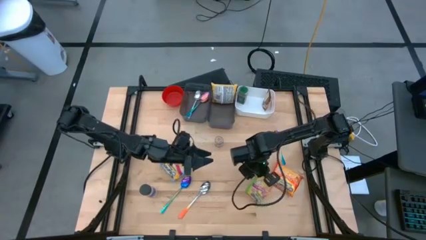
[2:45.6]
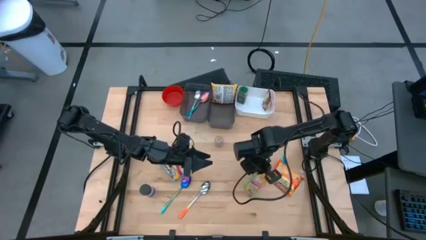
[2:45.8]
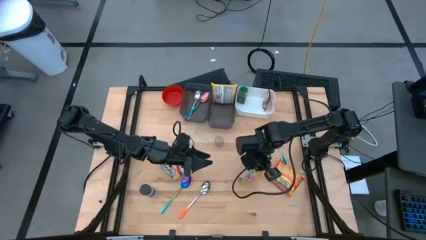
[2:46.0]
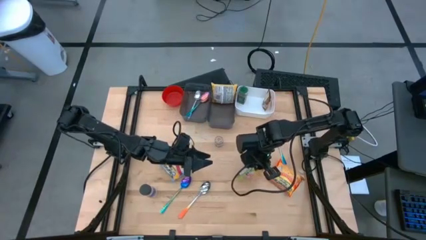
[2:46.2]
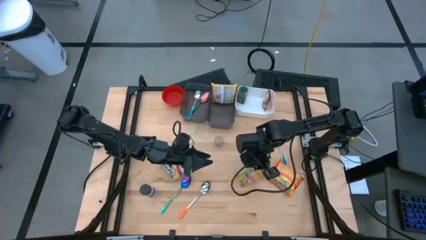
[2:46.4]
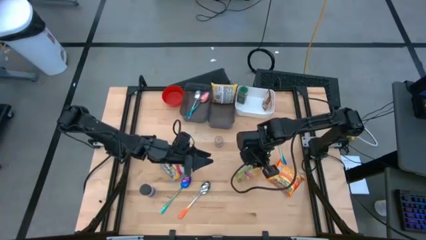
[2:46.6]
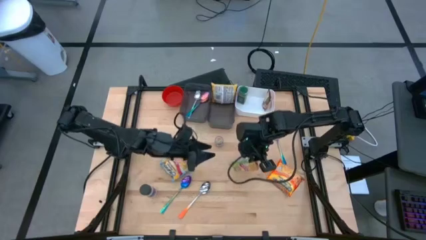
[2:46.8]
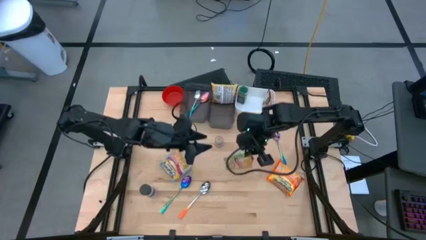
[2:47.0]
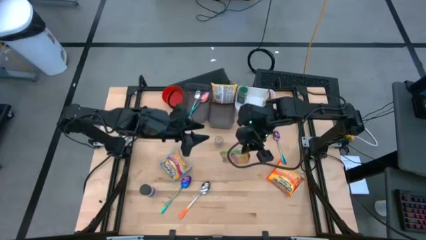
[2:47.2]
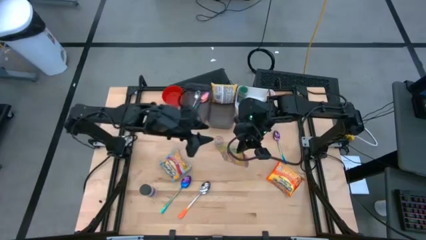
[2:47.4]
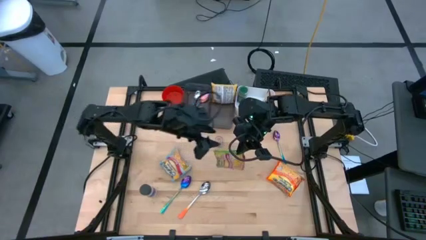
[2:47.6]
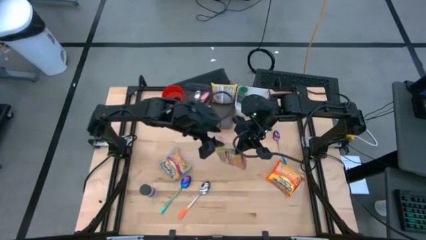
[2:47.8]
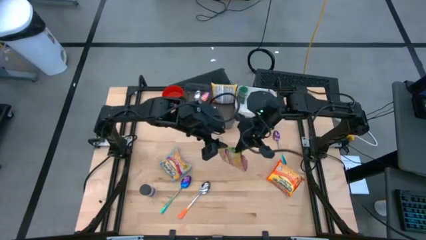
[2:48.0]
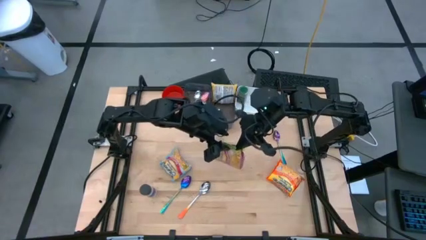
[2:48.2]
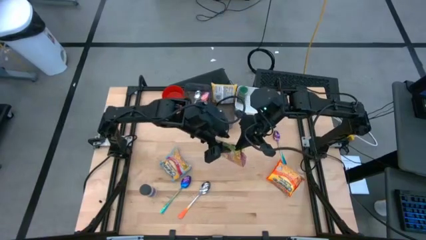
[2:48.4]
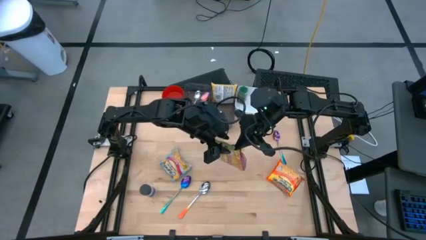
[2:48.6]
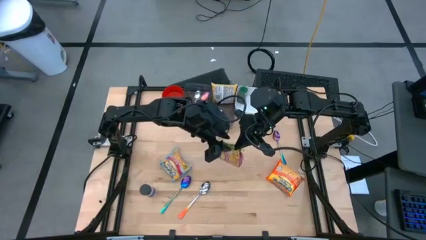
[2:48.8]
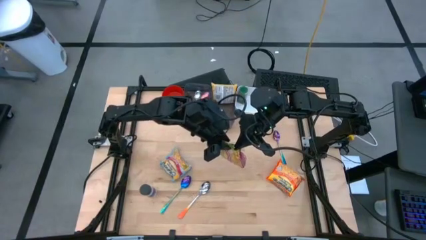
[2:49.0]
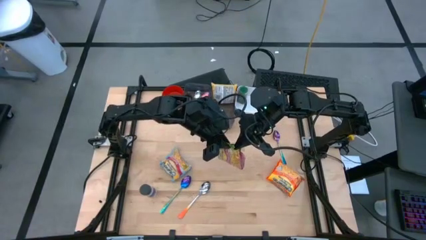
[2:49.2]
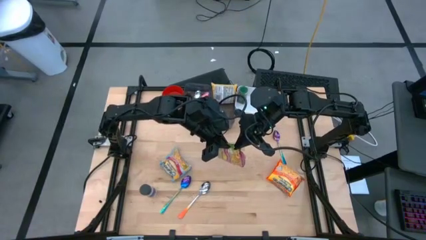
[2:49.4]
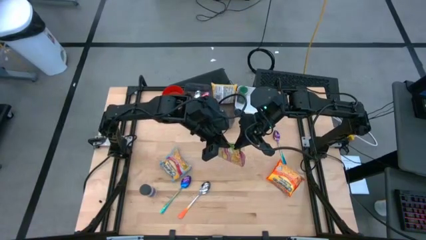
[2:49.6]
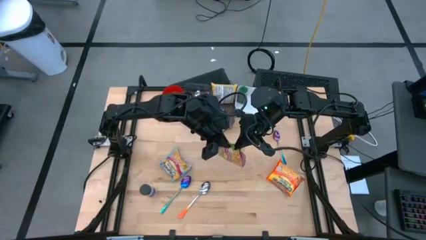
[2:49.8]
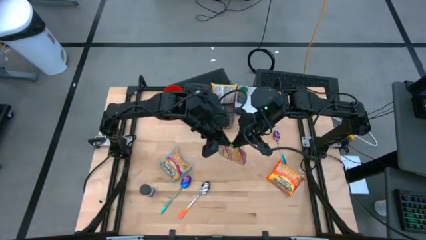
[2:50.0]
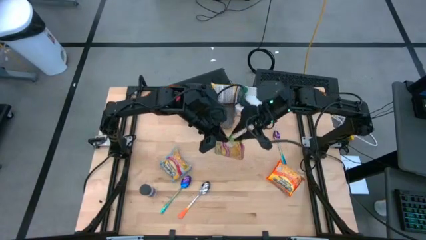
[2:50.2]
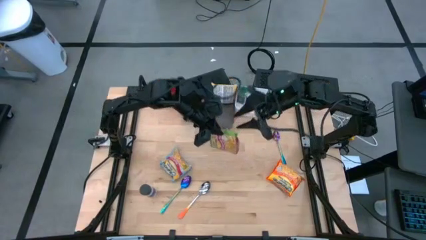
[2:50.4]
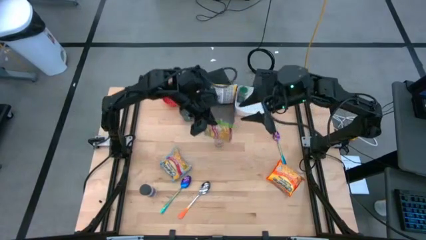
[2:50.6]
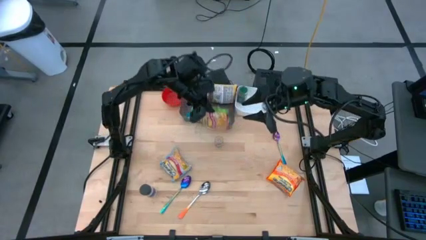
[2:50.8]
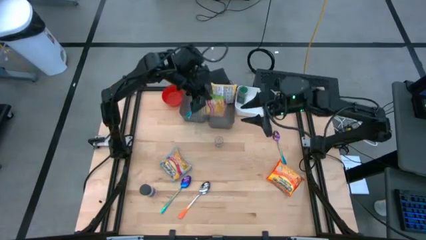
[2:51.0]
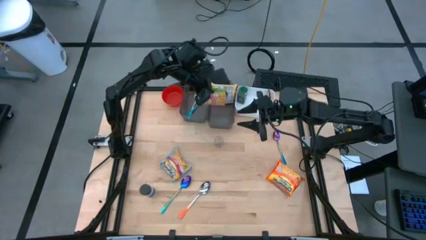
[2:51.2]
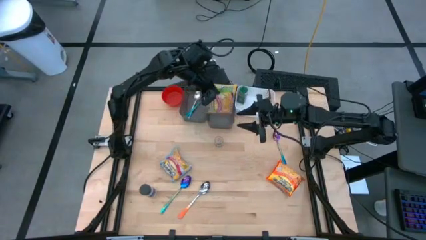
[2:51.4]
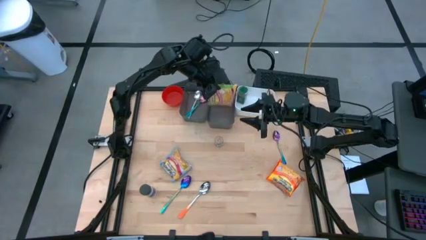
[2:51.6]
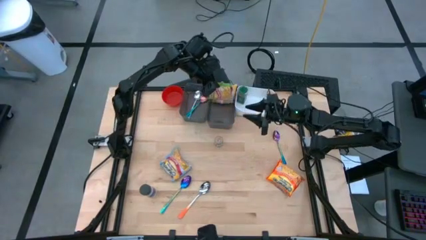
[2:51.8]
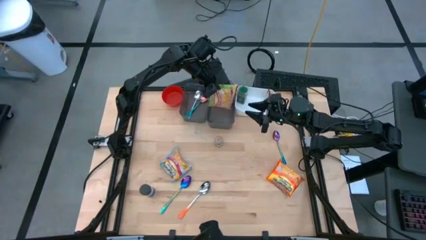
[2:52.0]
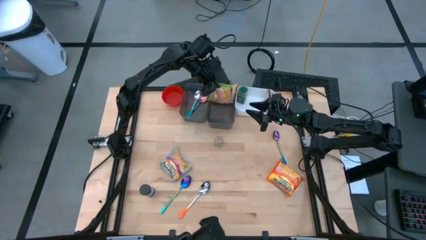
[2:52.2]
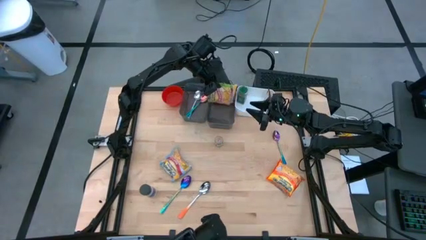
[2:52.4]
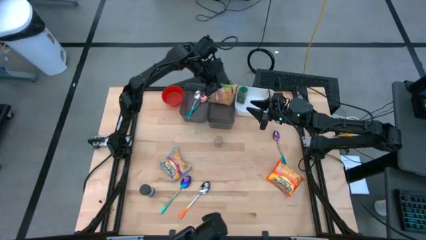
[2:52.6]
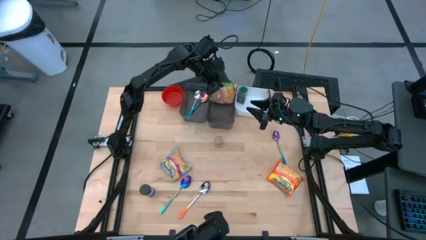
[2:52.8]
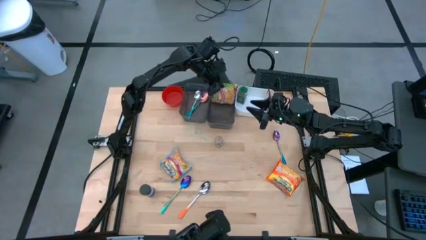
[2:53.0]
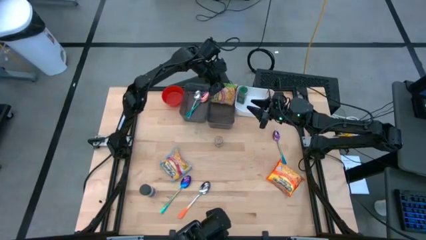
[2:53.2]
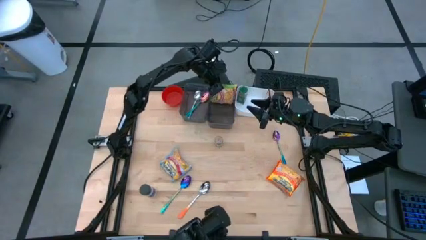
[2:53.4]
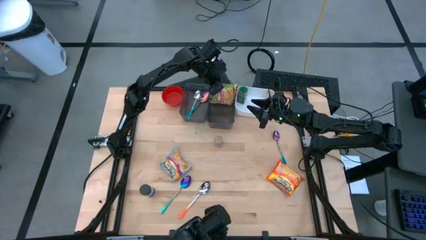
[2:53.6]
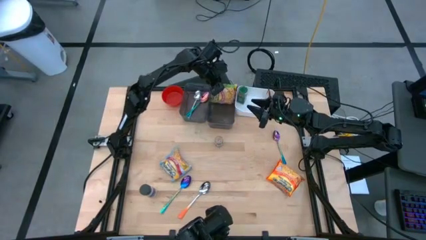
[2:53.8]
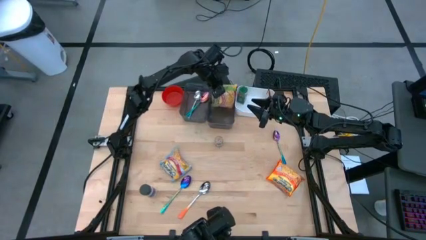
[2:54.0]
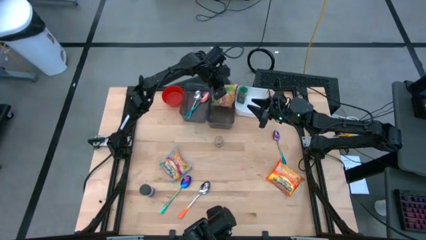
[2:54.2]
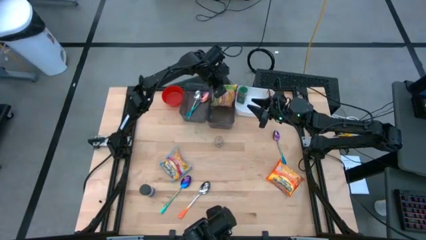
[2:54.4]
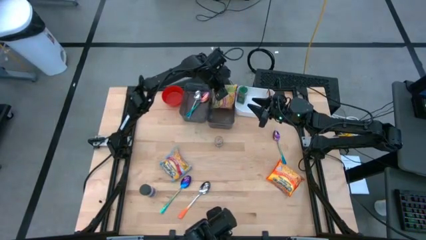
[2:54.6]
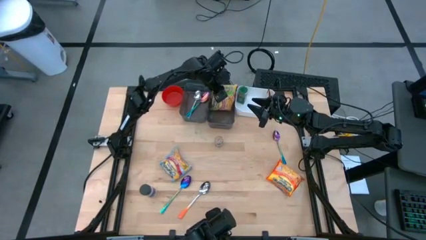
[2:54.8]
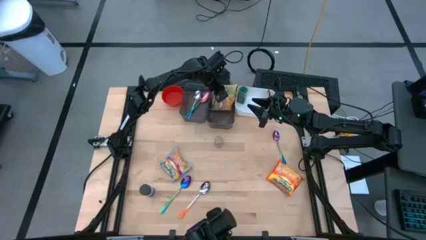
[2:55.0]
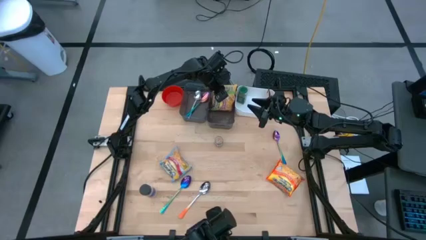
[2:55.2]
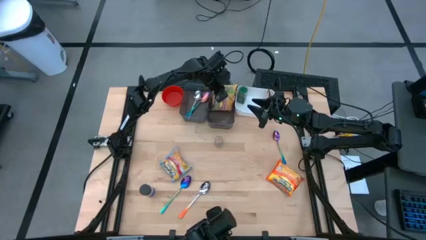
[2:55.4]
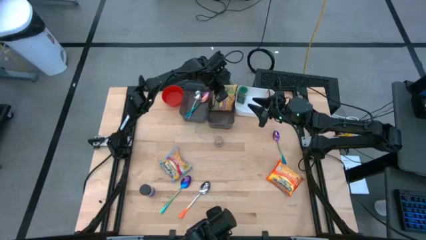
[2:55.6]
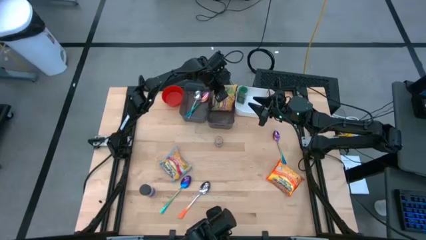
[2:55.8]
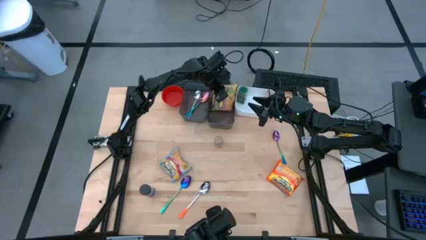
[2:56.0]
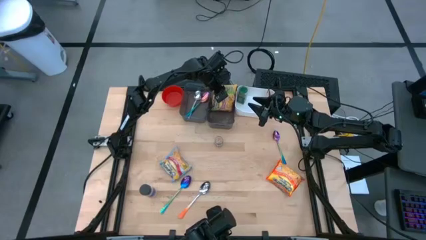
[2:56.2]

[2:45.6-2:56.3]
Task: Pick & Place Food Item
Put the green noodle pack into the right black bin

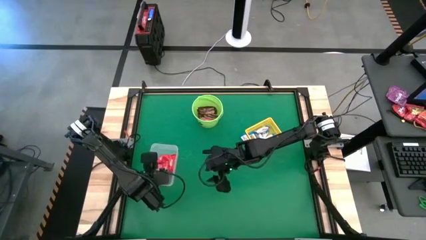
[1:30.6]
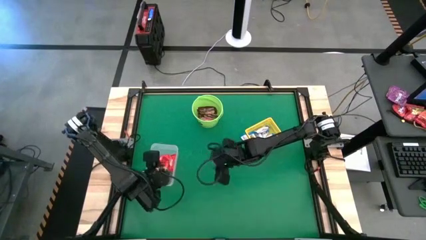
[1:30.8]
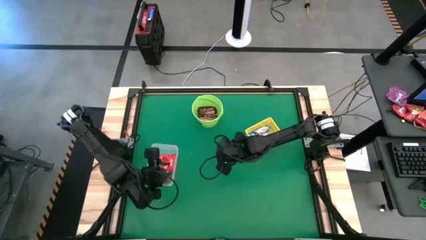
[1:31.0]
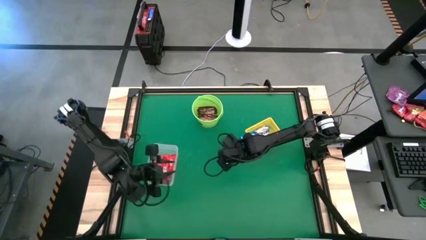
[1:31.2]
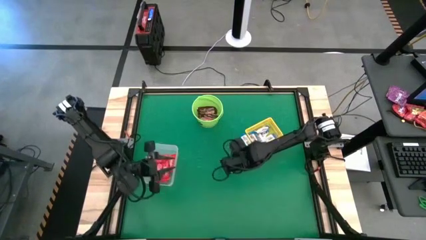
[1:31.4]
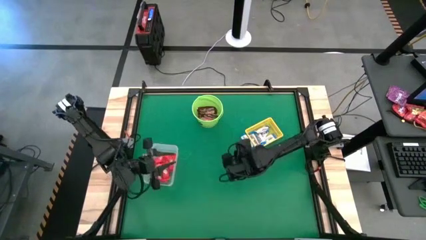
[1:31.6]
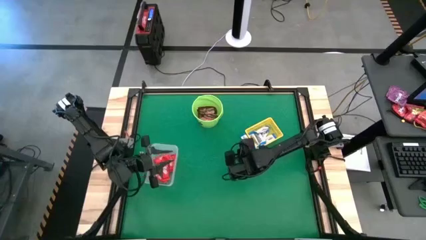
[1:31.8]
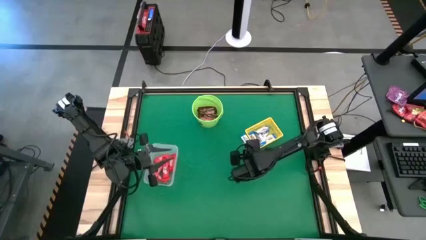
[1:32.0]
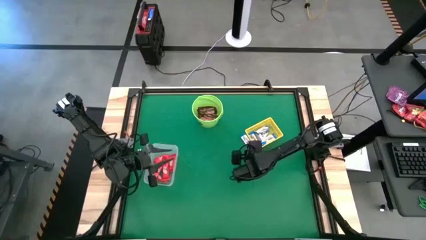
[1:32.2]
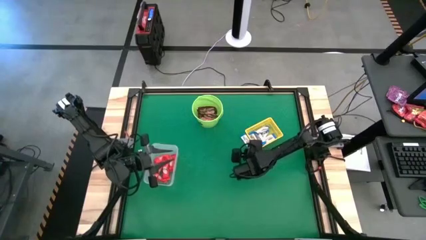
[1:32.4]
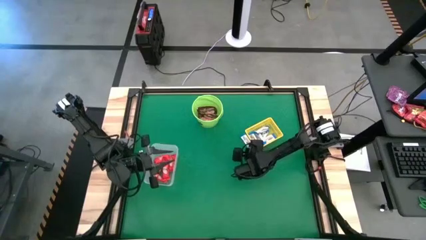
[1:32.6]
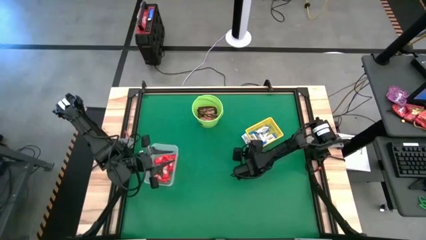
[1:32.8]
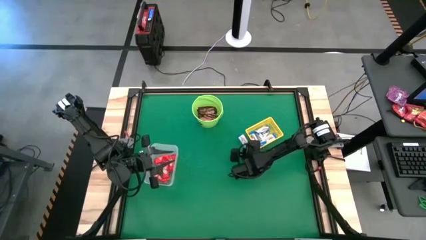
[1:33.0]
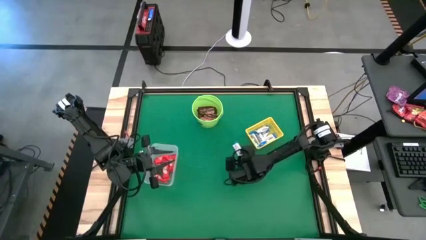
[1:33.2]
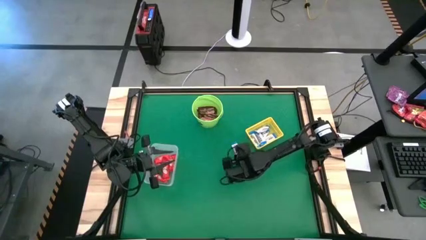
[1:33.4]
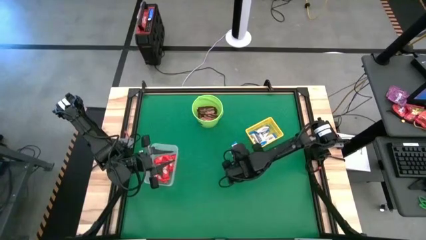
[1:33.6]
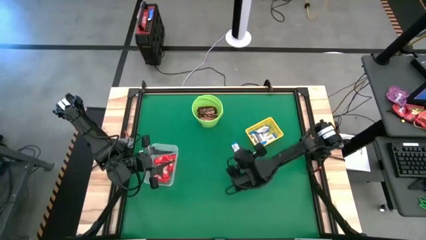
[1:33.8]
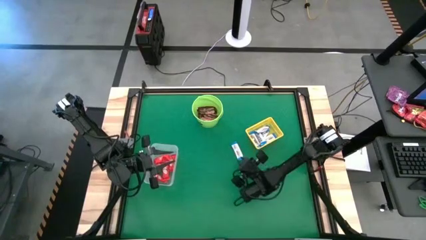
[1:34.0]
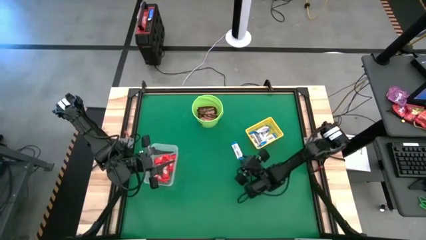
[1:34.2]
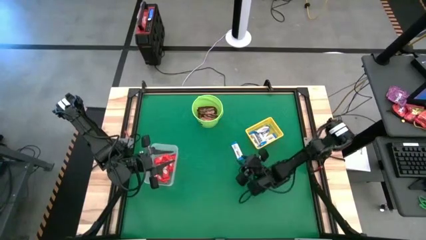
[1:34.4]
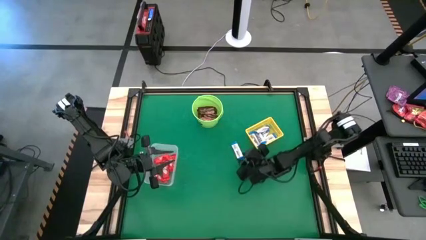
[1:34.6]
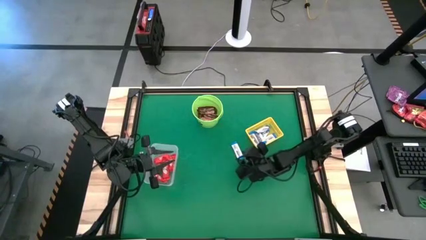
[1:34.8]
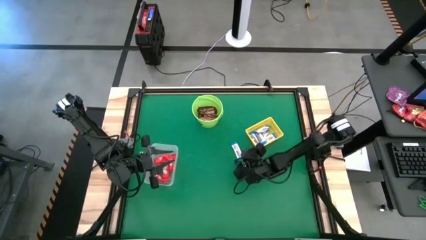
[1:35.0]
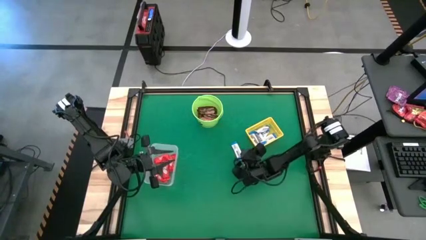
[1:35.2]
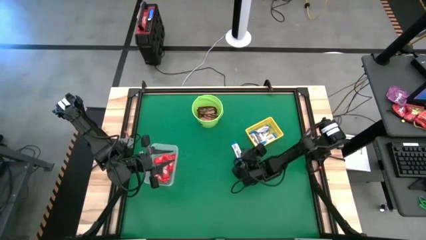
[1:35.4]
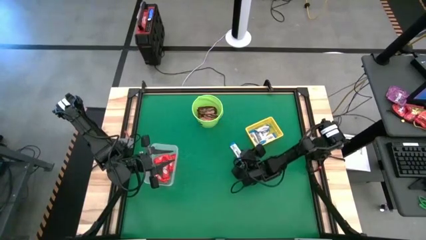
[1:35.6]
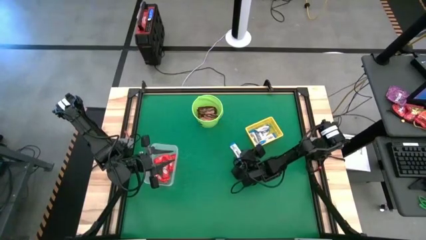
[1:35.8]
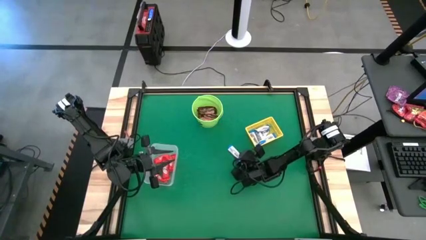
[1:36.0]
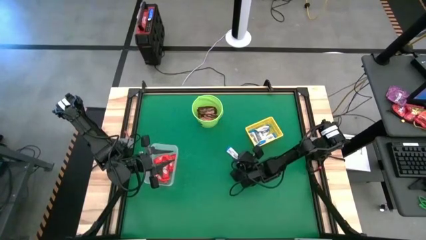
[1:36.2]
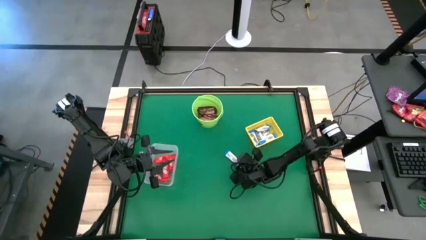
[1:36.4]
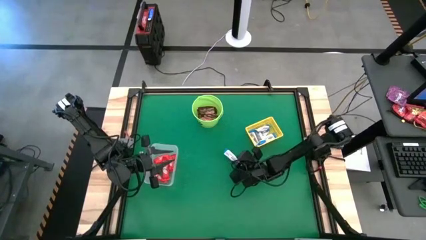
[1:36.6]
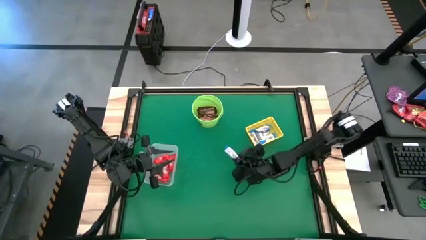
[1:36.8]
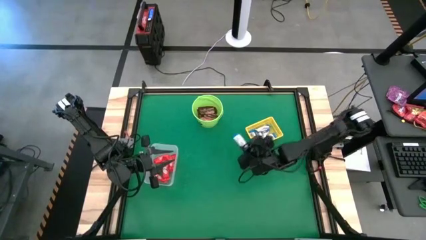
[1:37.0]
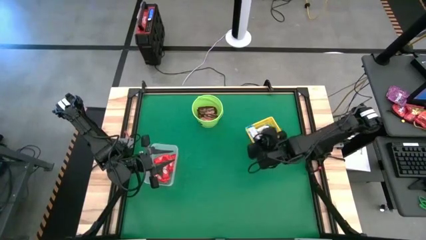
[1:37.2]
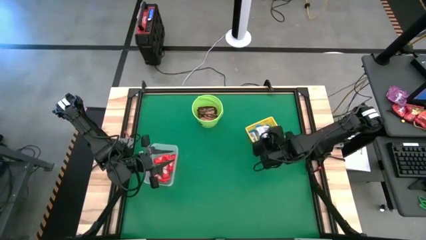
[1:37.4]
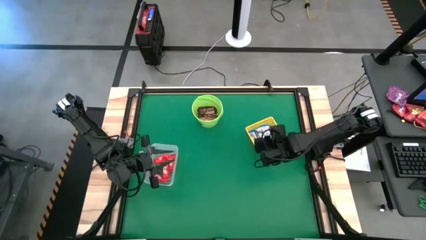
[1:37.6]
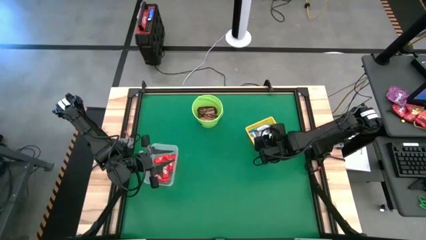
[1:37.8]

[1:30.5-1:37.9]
Task: Sort candy by brand, put in halloween buckets
Put the white chocolate bar into the yellow bin
